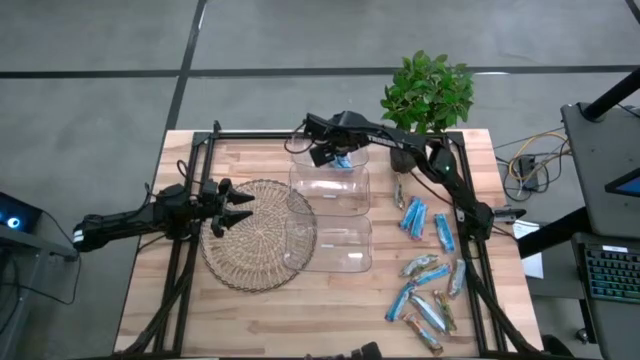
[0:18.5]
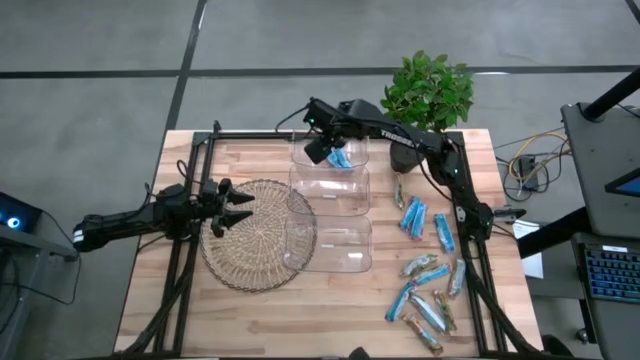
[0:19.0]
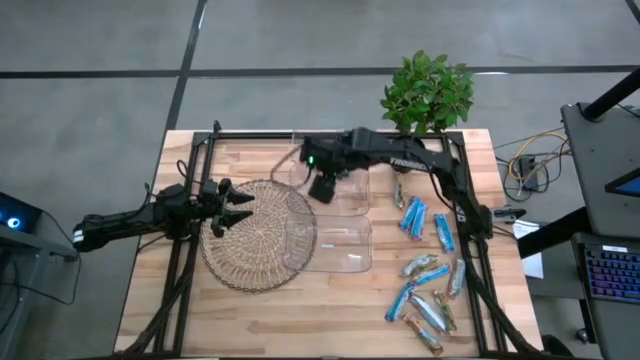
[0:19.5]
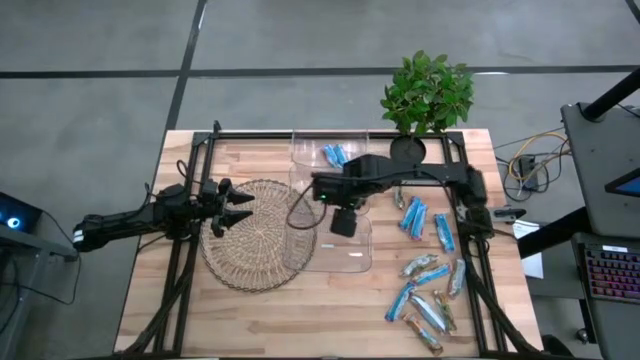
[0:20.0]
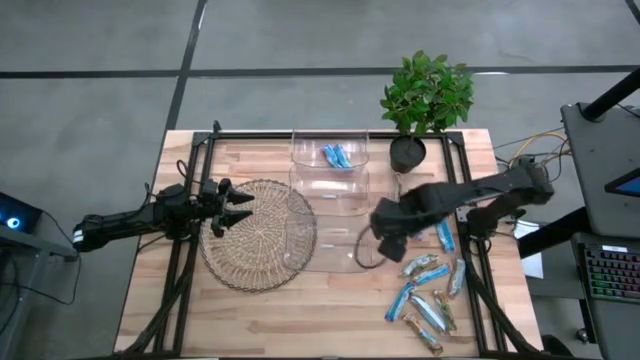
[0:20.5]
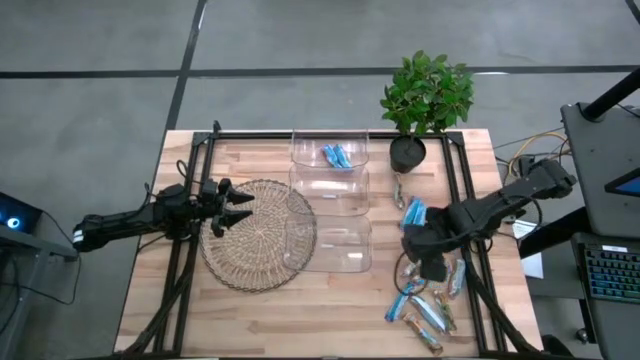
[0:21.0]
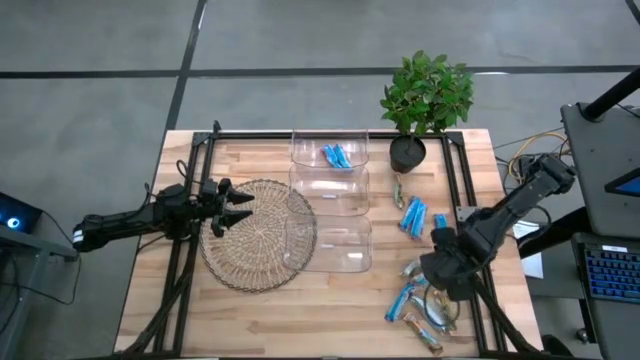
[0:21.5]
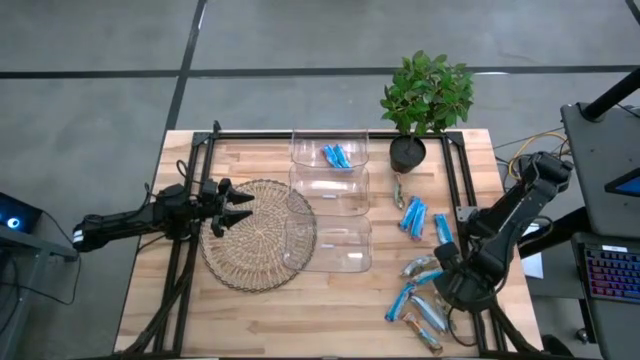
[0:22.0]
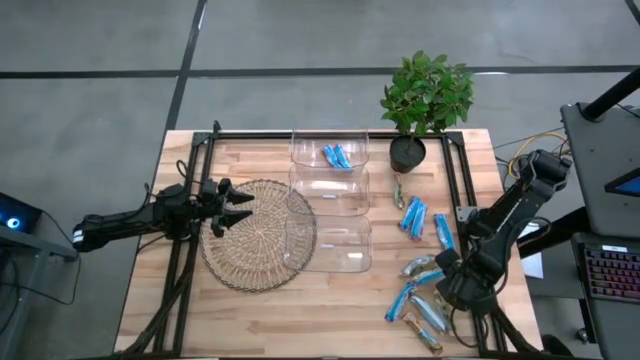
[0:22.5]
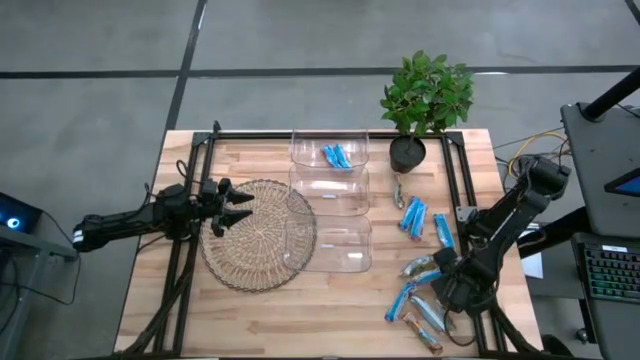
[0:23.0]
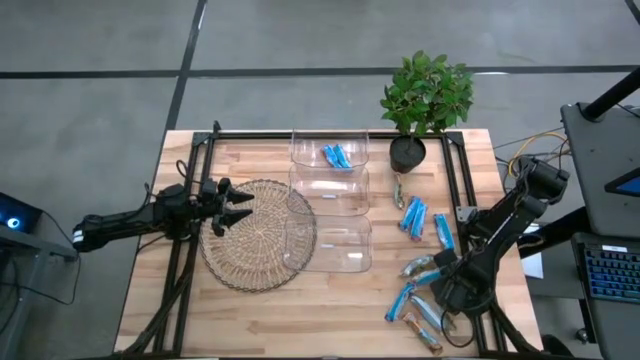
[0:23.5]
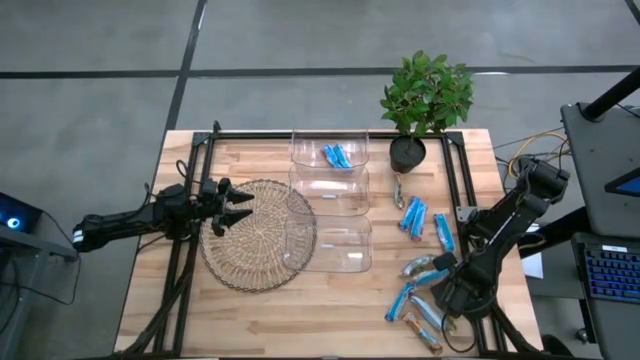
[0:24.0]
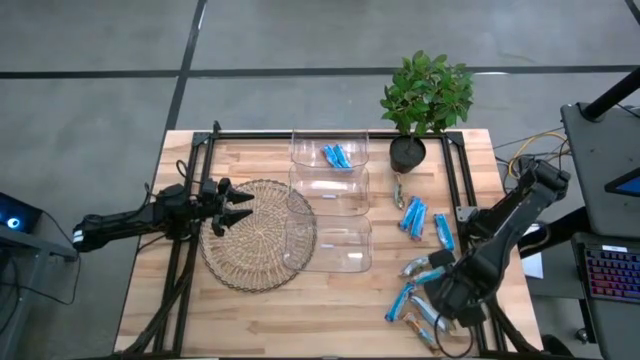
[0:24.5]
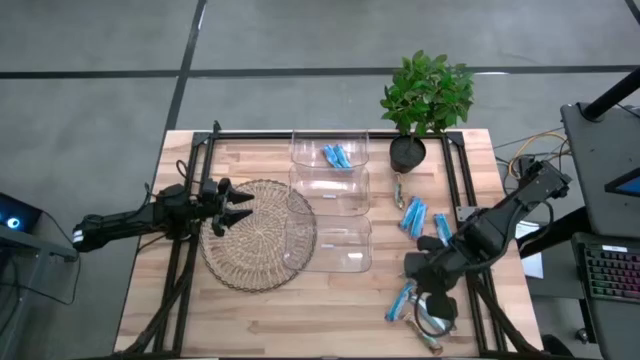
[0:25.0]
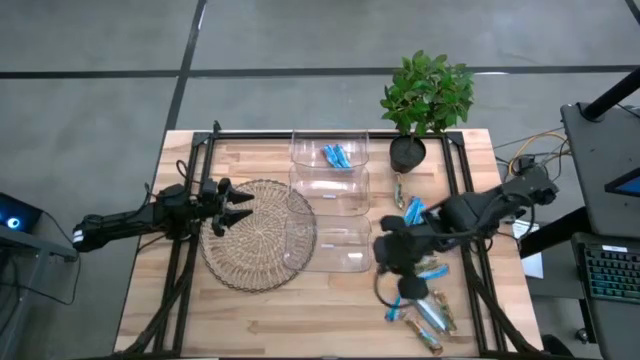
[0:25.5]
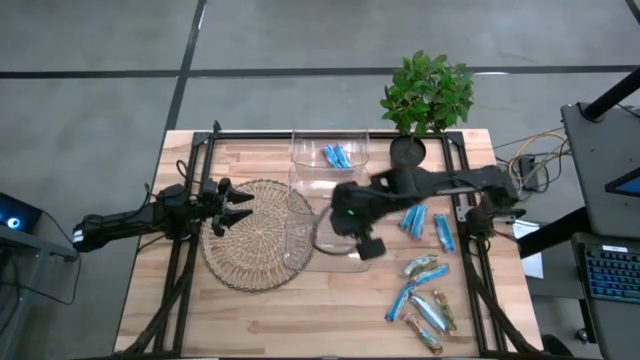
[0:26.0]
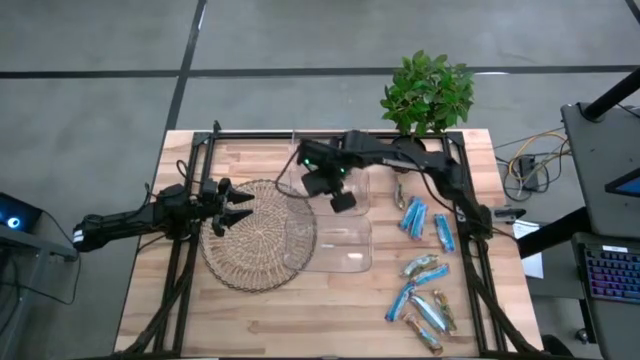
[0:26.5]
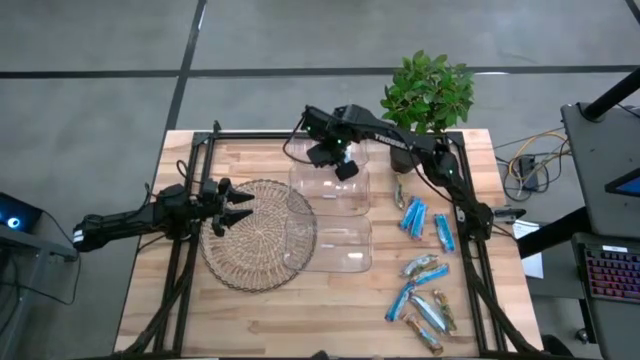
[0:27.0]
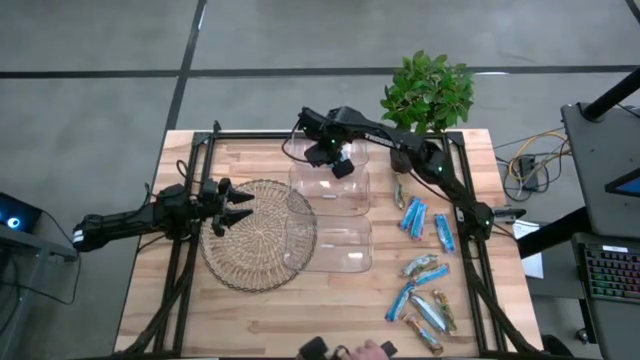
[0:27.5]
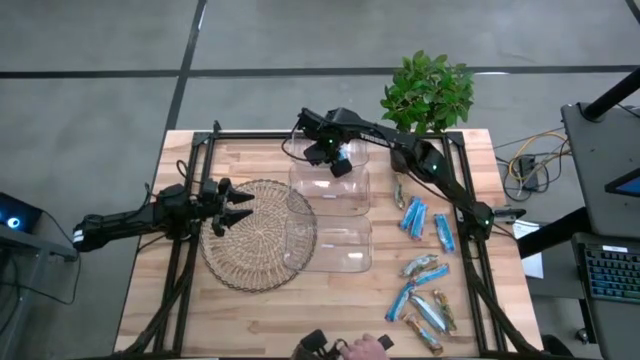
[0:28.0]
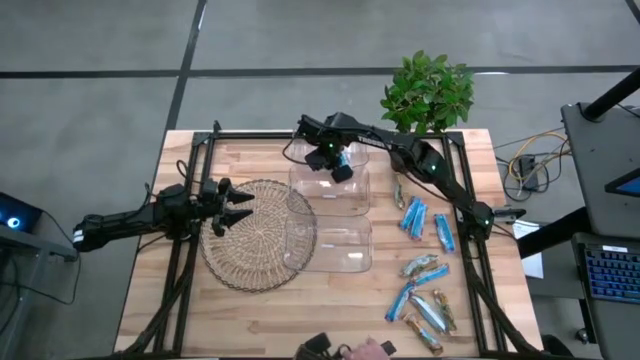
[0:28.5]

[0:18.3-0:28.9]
Task: Pick and place Granola Bars by type
Put the red granola bar into the top transparent bin

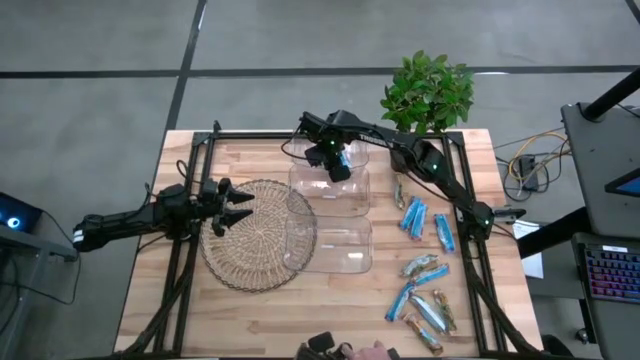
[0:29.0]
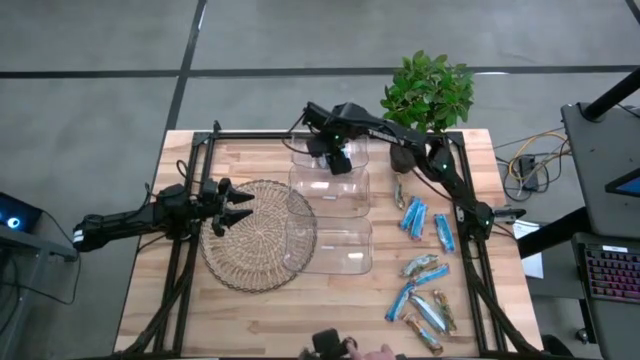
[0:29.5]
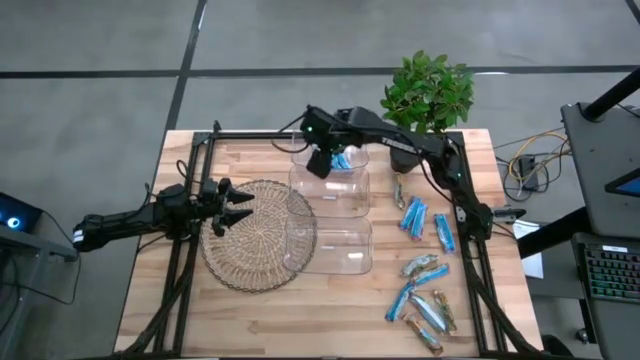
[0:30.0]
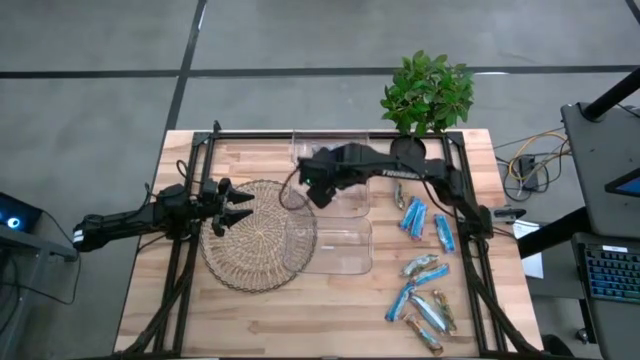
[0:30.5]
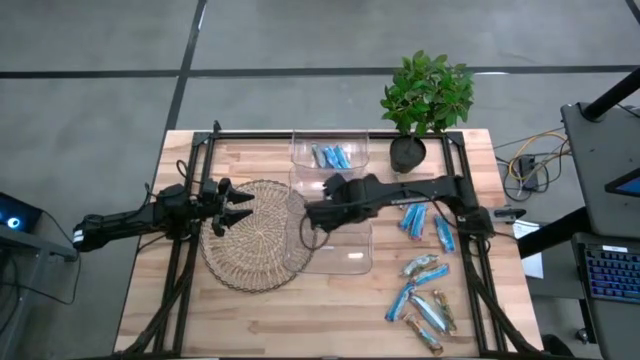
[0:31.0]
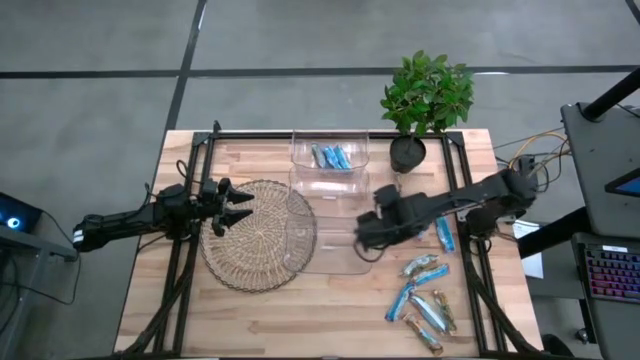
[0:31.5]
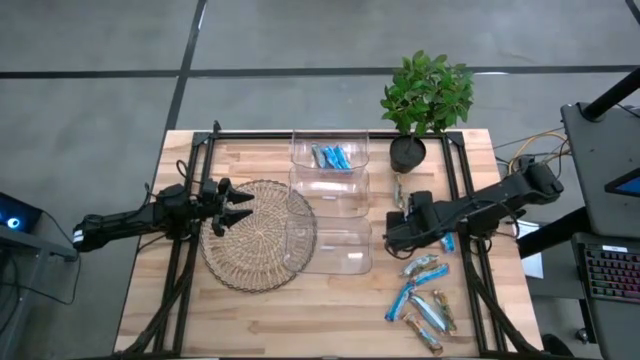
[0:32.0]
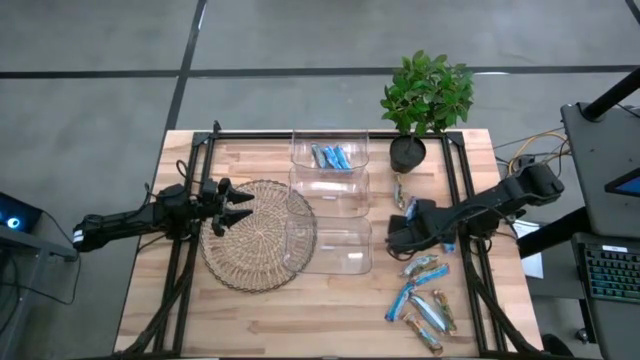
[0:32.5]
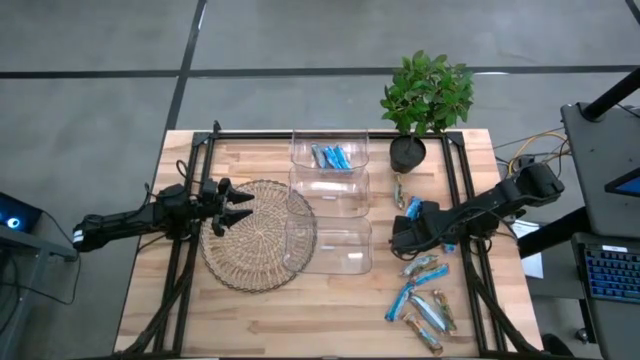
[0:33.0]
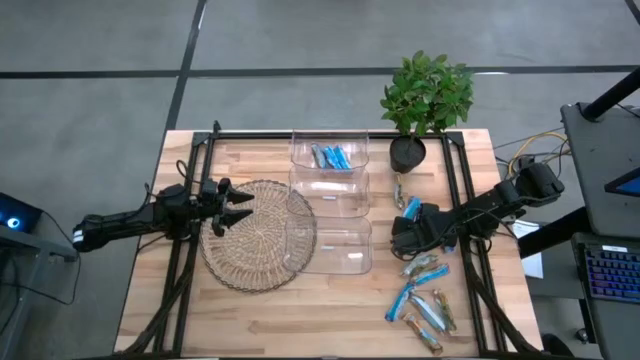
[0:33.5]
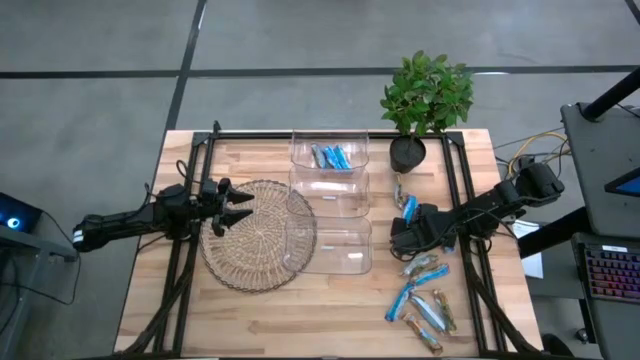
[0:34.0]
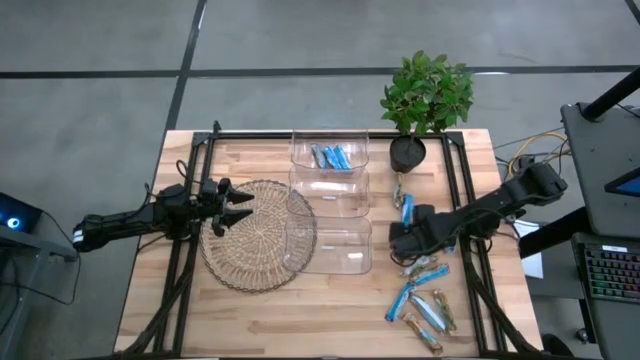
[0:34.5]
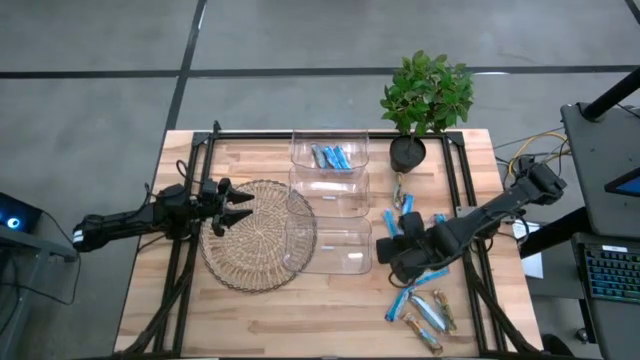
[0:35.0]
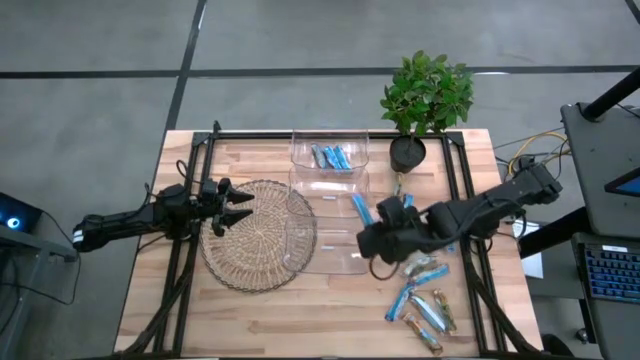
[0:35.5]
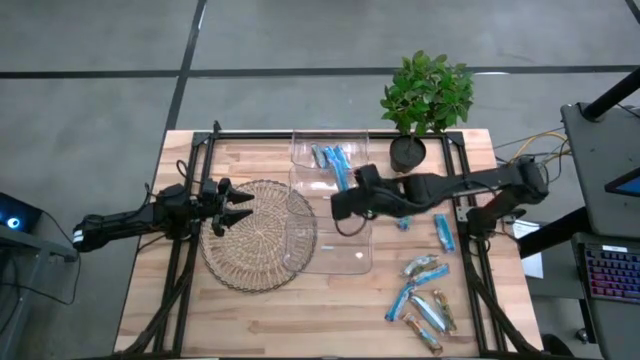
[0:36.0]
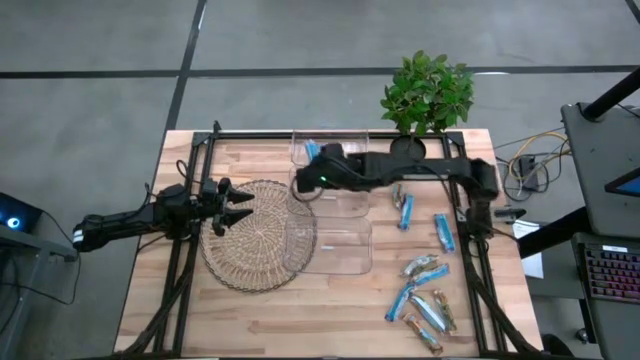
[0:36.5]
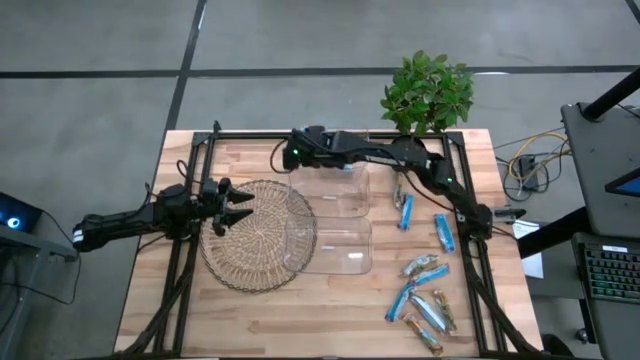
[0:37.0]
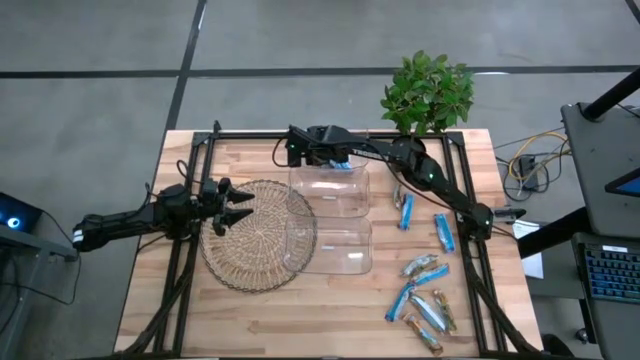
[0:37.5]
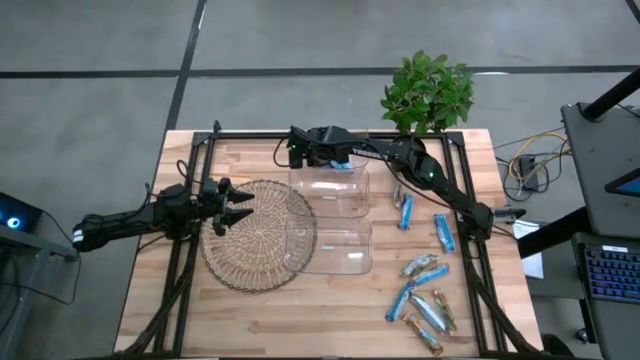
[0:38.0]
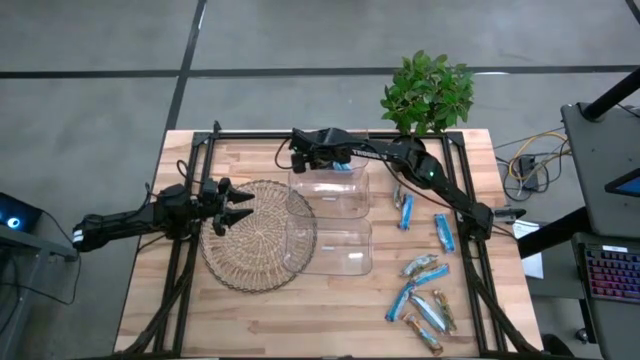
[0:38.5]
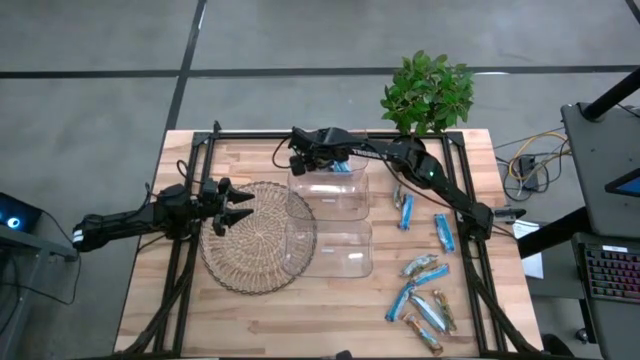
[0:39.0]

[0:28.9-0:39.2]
Put the red granola bar into the top transparent bin
